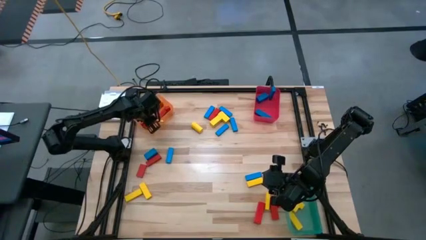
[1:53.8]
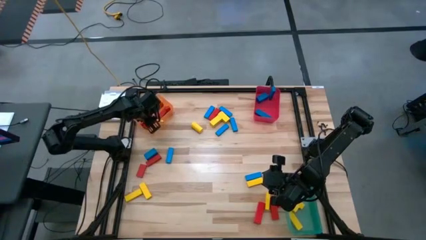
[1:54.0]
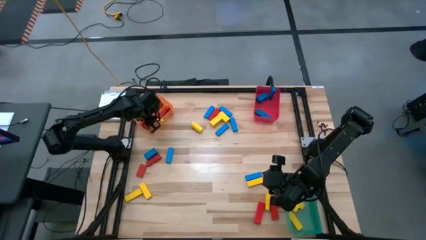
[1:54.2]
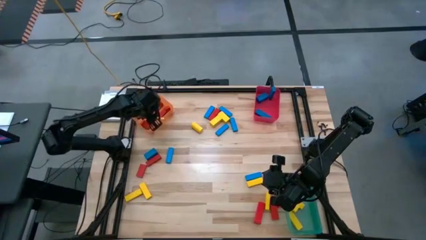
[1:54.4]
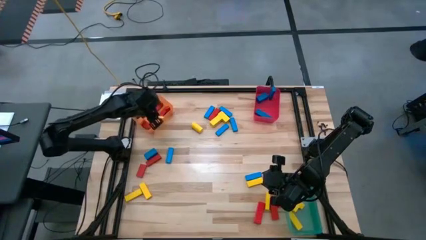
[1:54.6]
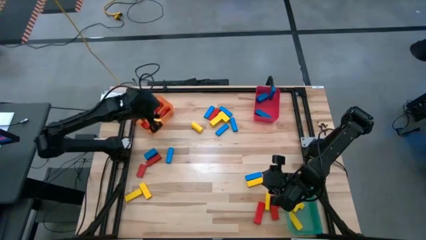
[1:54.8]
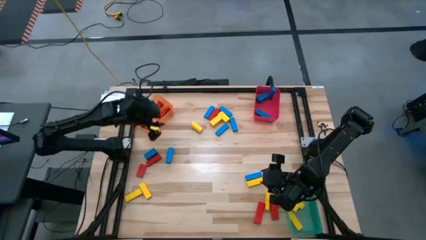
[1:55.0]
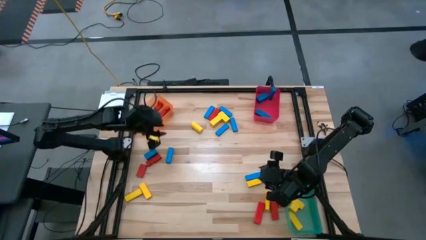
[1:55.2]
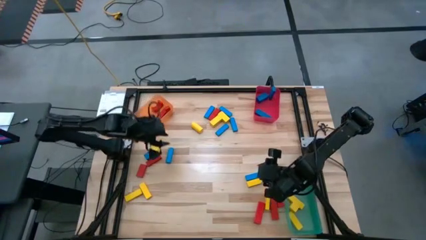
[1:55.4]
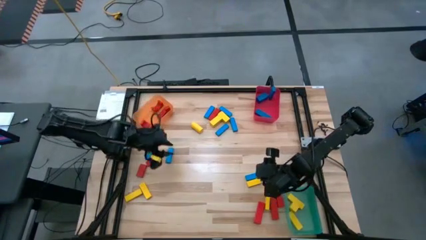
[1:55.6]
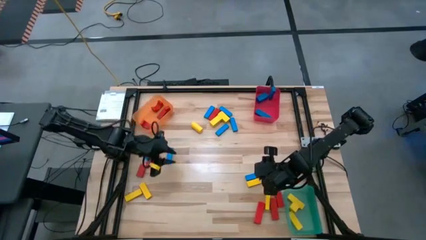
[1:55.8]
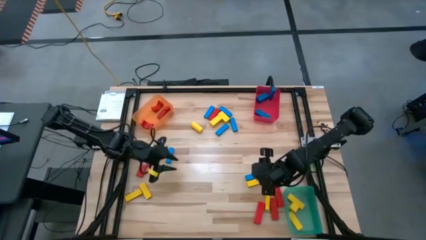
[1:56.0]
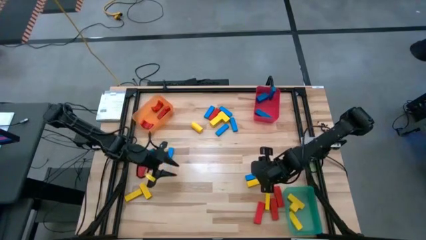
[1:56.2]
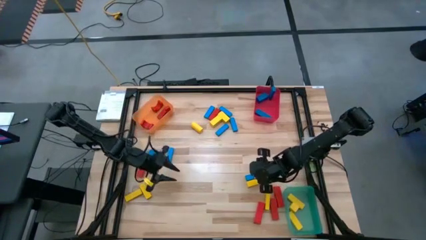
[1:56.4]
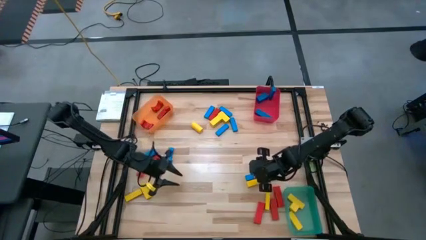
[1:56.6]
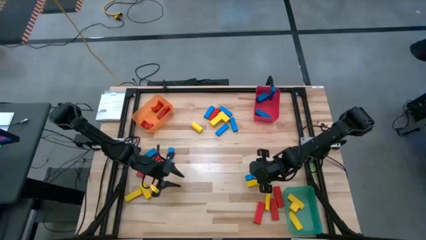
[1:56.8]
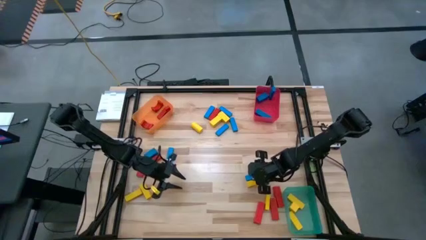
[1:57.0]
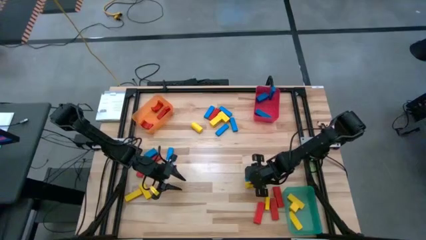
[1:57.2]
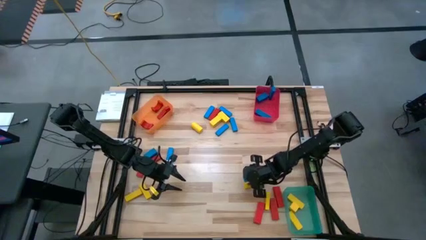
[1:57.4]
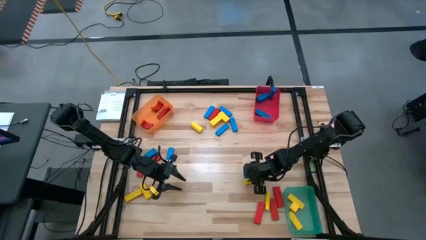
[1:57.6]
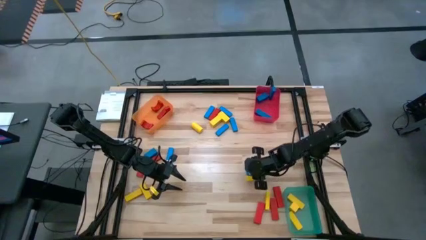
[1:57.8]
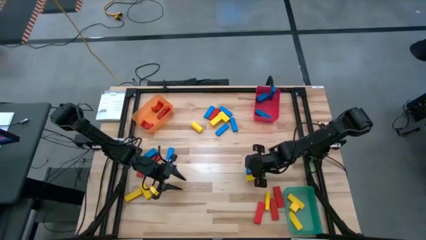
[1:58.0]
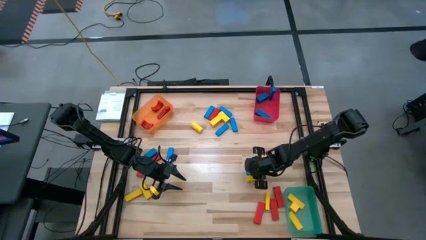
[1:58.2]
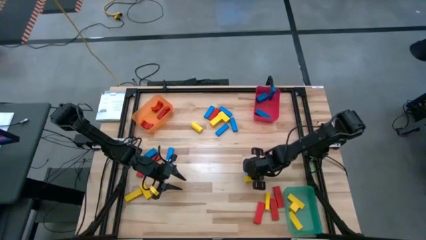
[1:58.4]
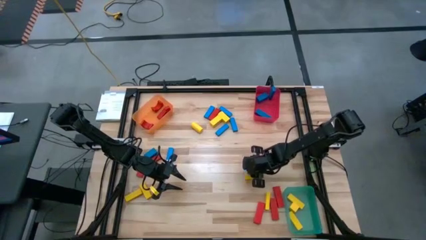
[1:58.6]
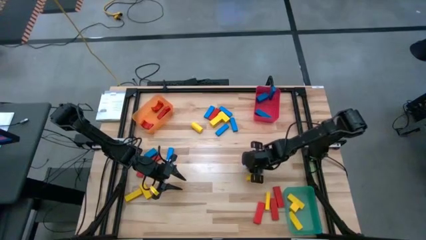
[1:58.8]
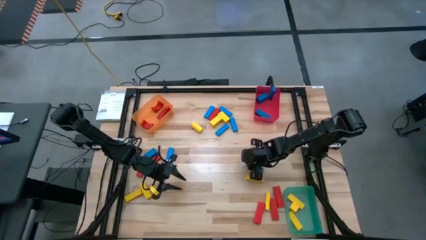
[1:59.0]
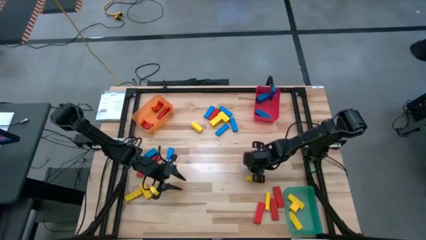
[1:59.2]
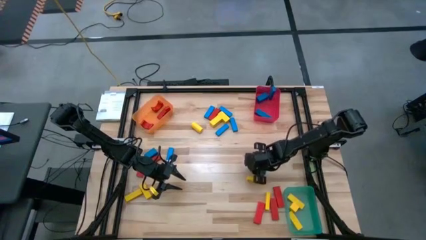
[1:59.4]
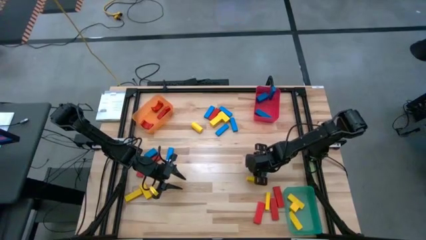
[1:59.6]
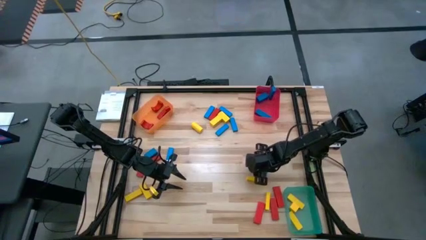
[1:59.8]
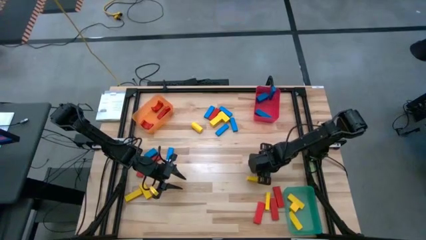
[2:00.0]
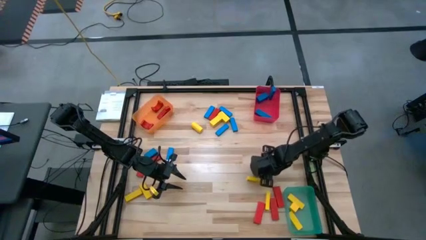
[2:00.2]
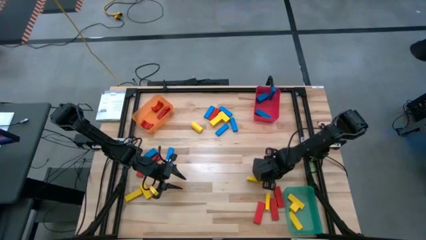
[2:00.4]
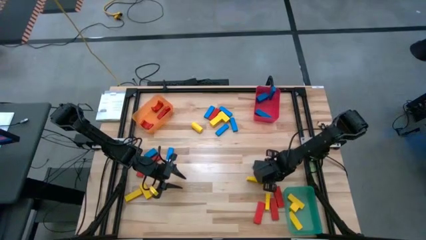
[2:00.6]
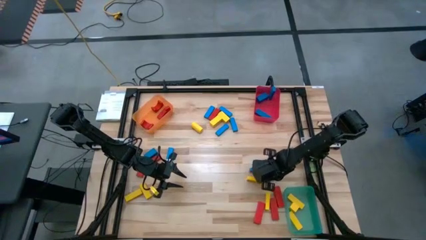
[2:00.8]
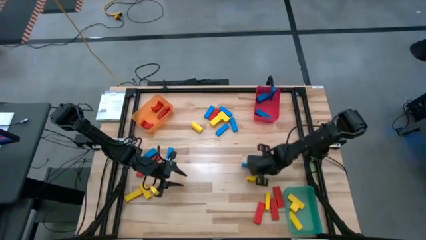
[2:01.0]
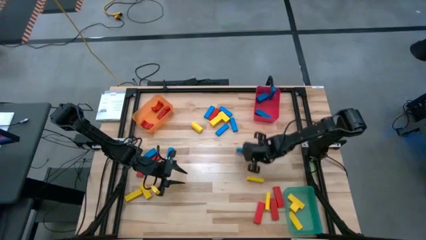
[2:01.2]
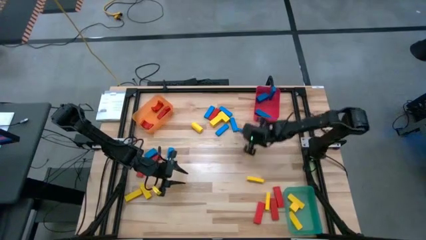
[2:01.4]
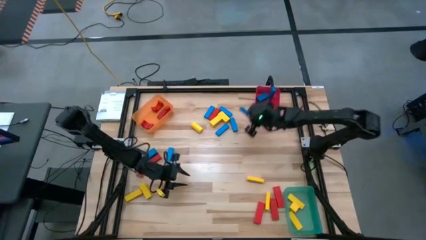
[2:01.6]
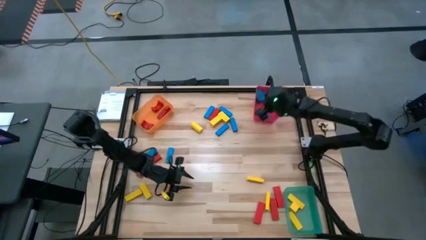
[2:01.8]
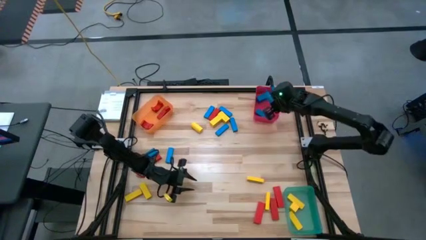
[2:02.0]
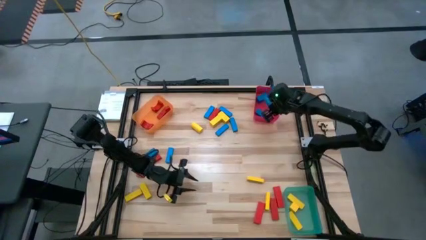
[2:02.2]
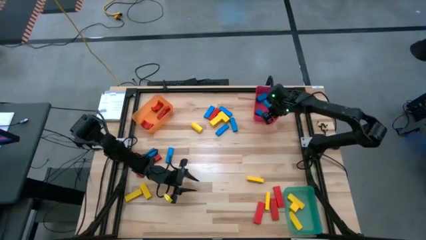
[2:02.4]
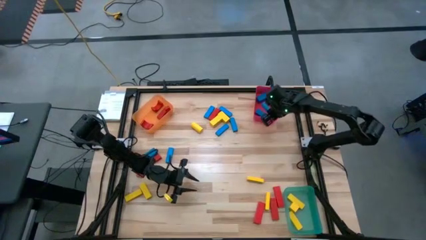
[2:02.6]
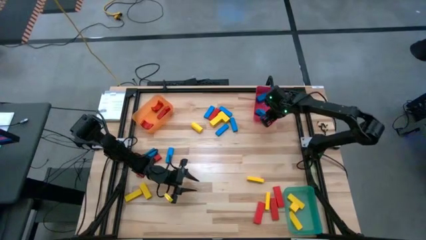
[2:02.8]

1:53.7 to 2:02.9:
Task: Sort blocks
Put the blue block into the red bin
